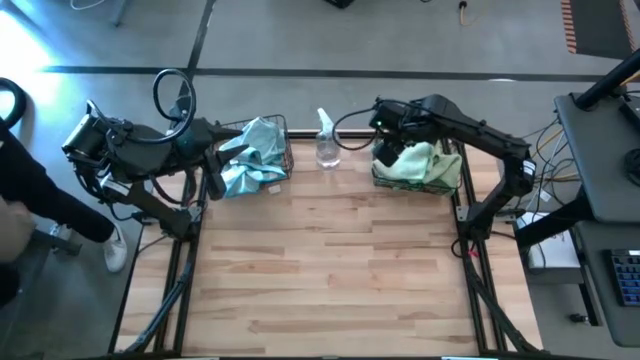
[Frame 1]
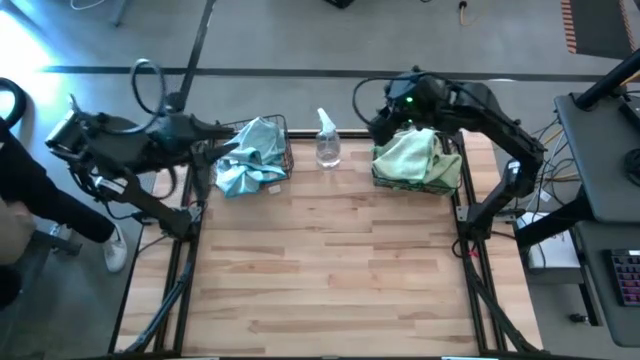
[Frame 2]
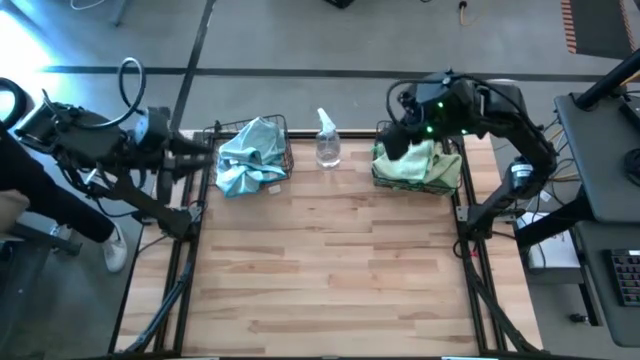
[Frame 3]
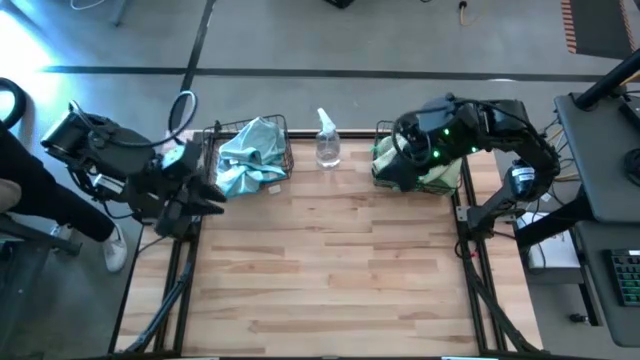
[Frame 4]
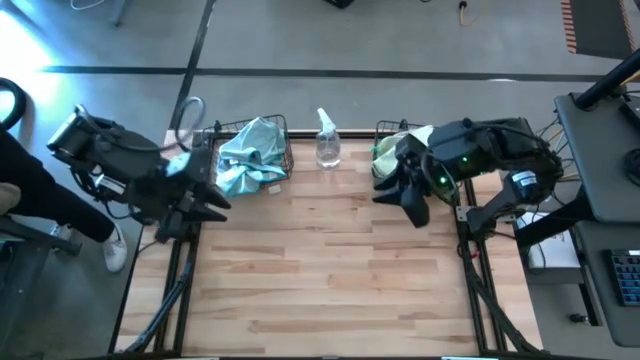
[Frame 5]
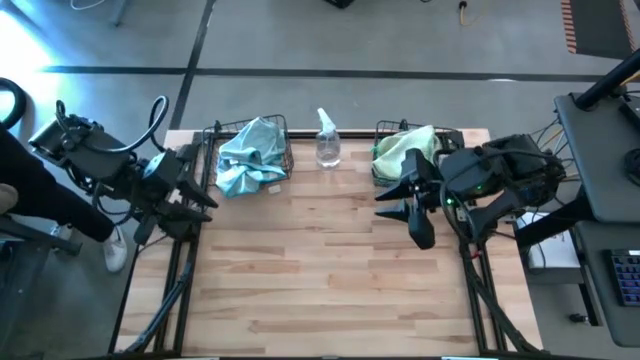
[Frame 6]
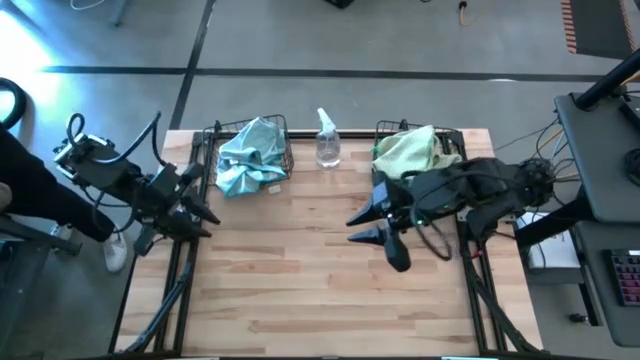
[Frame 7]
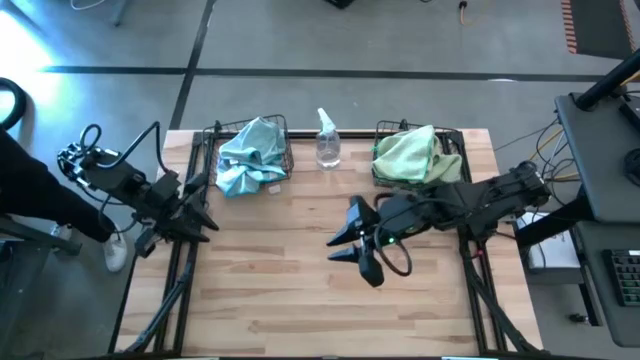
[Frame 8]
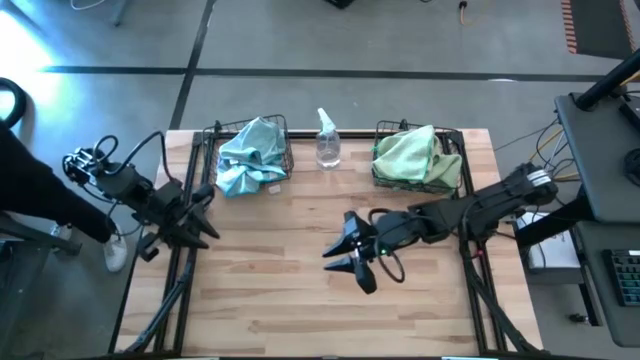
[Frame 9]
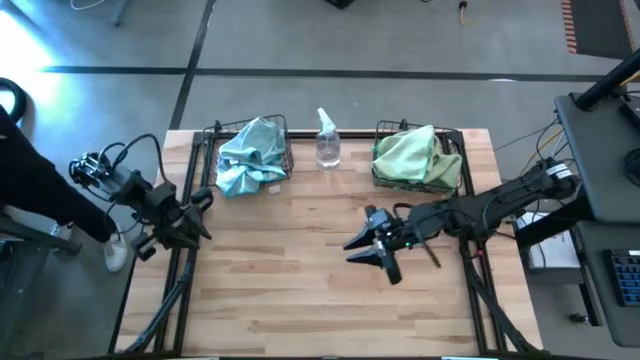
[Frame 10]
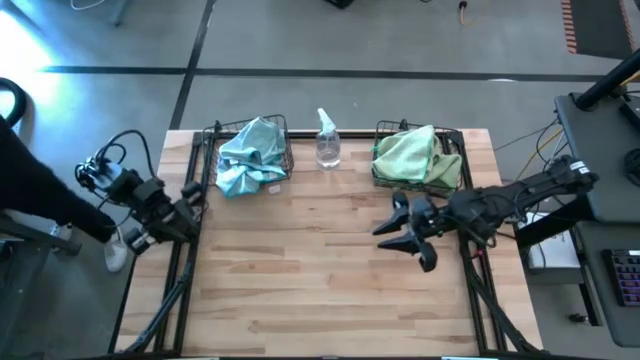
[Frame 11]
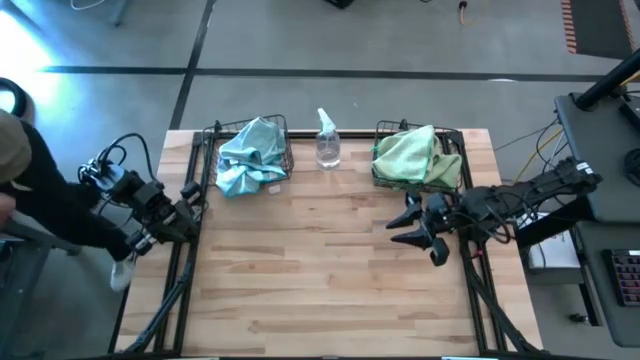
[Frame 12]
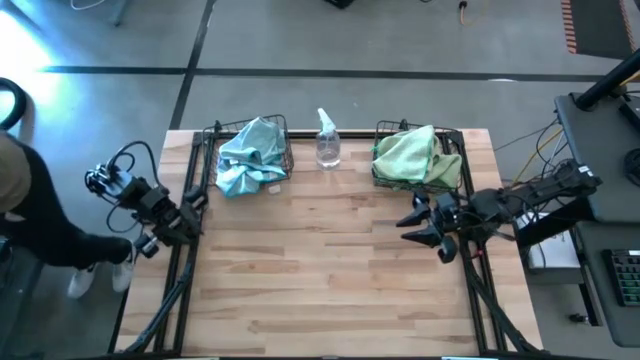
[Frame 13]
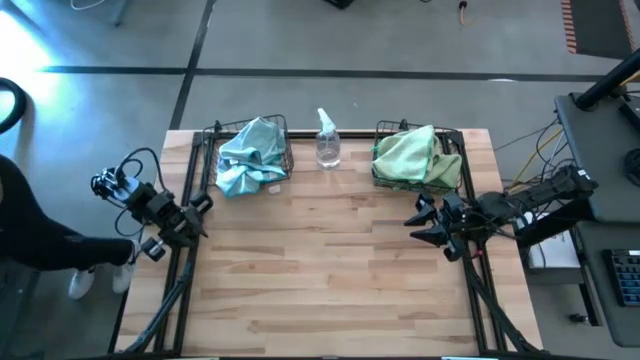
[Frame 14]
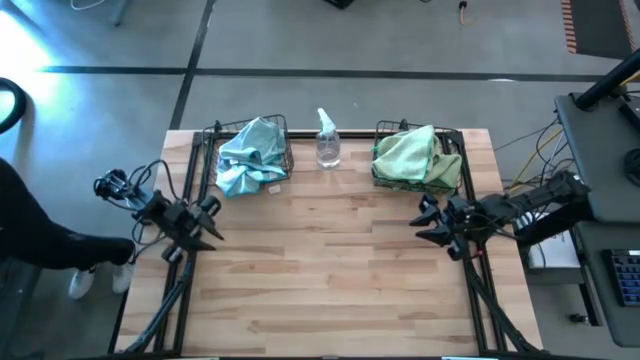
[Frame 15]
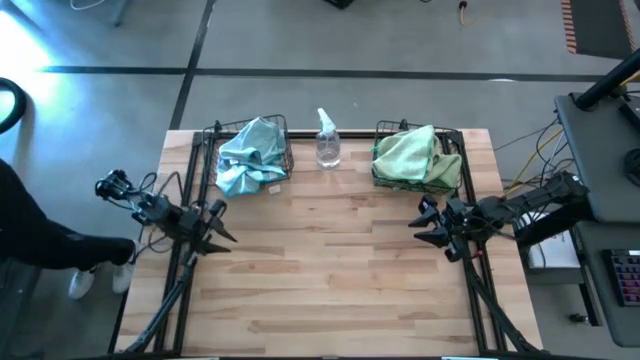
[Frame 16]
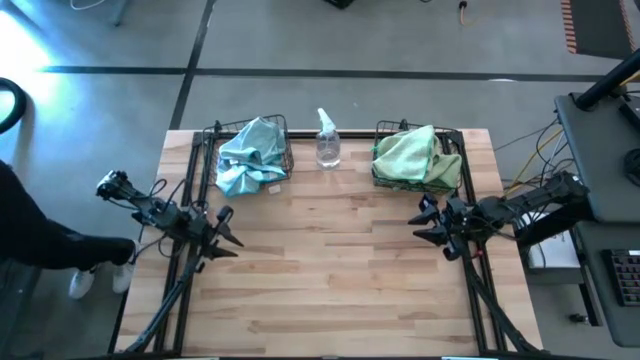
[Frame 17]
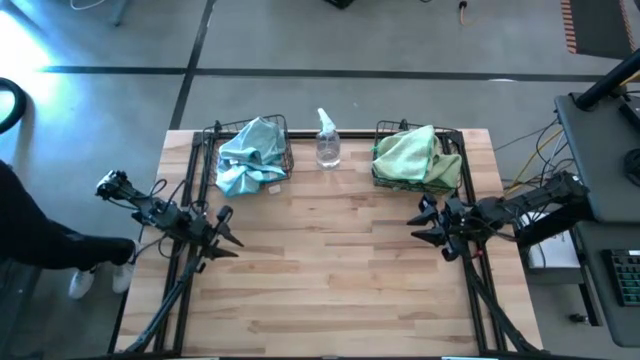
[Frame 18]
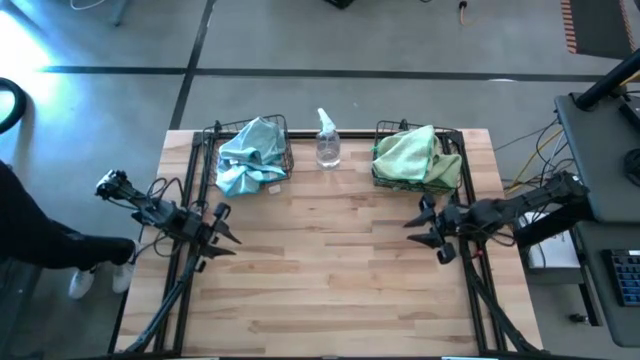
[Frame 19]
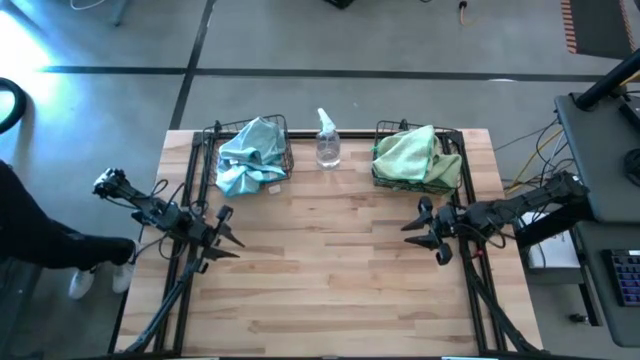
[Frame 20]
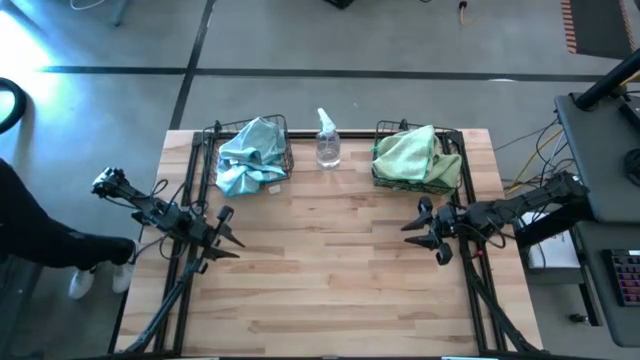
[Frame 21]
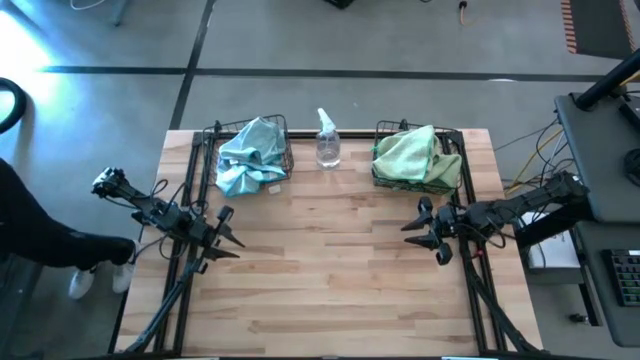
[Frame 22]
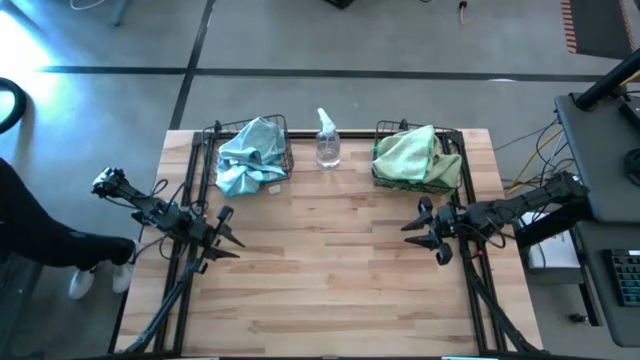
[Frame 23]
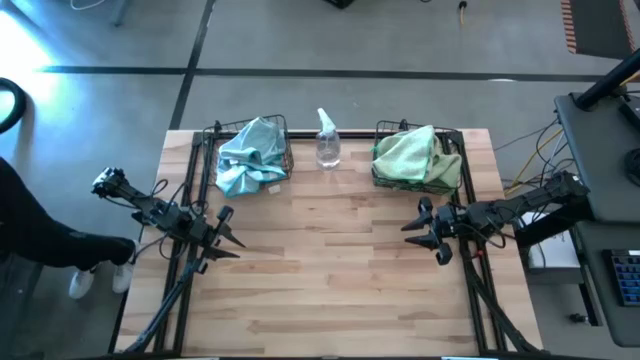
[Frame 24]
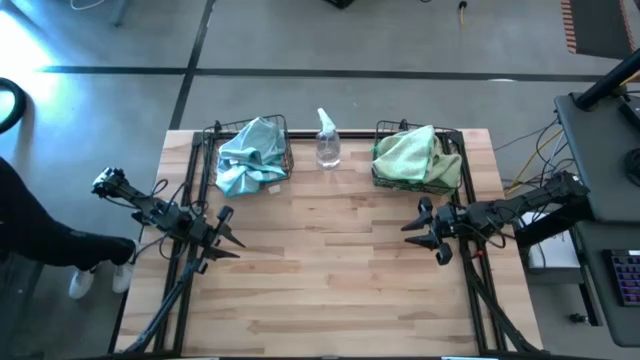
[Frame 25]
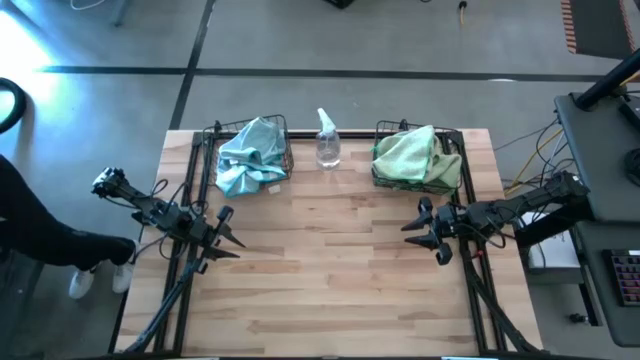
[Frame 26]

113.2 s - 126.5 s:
Task: Sort microfiber towel by color & place in baskets
Return to Home Position
